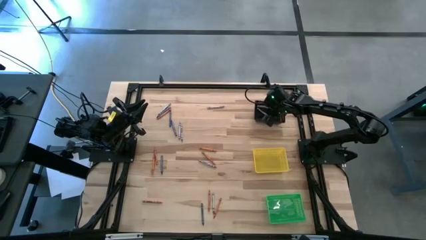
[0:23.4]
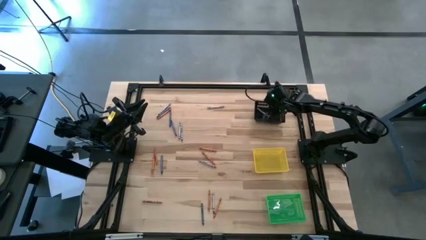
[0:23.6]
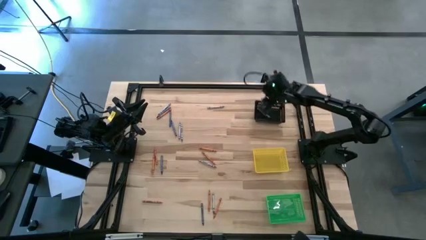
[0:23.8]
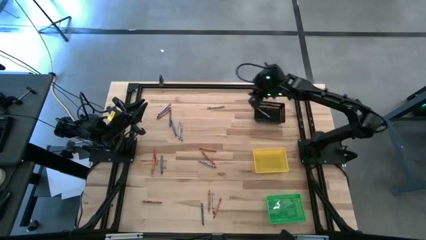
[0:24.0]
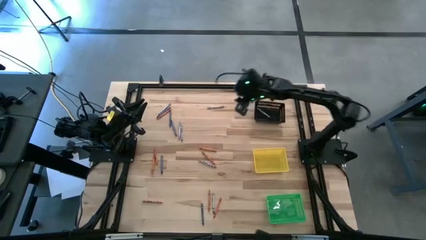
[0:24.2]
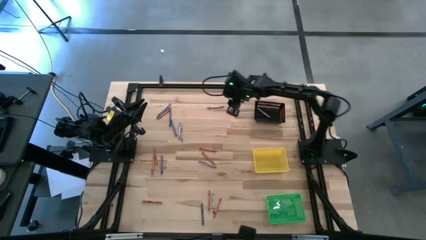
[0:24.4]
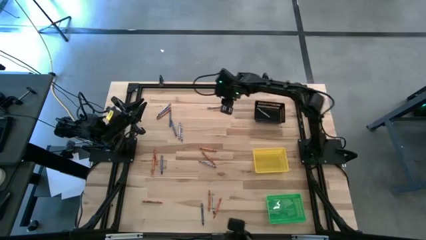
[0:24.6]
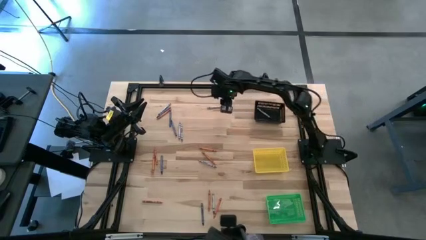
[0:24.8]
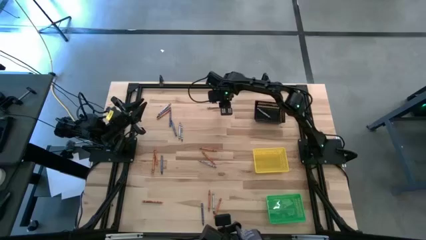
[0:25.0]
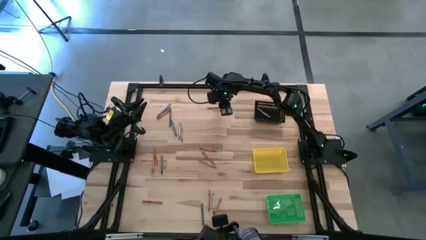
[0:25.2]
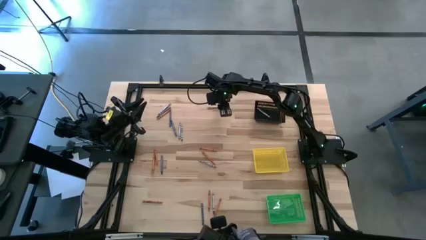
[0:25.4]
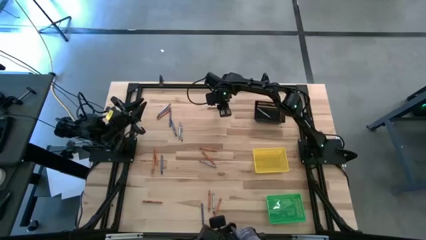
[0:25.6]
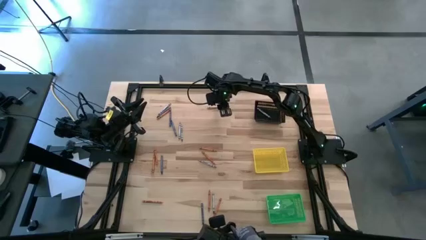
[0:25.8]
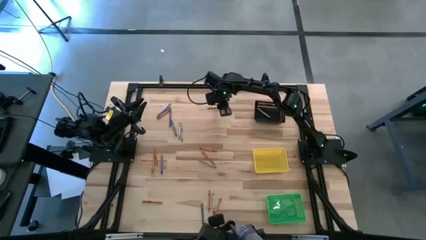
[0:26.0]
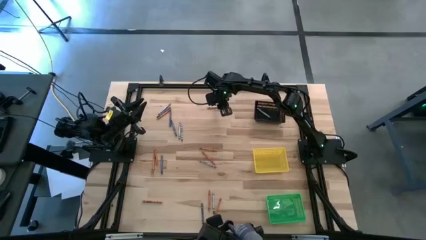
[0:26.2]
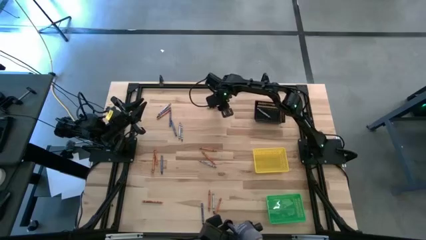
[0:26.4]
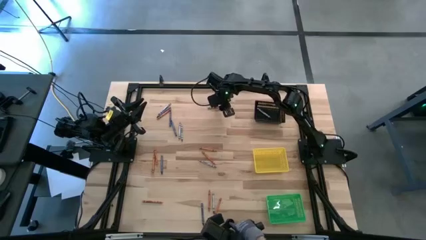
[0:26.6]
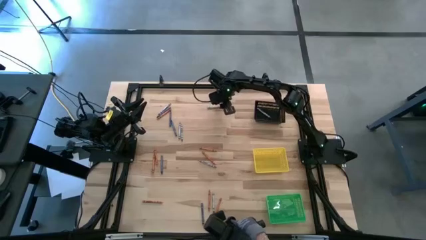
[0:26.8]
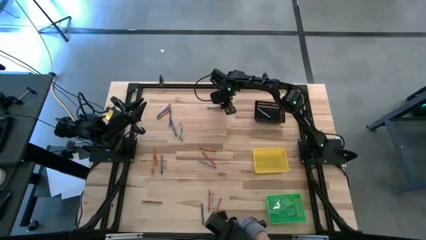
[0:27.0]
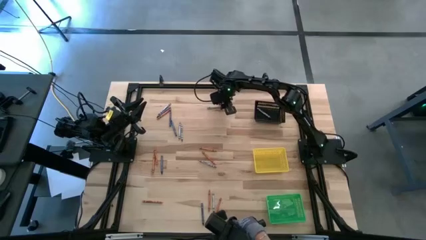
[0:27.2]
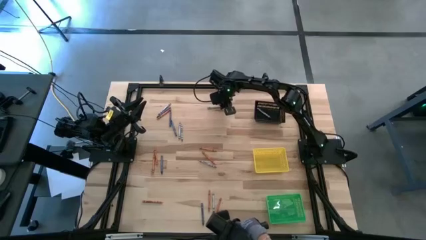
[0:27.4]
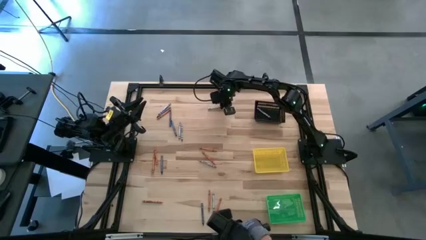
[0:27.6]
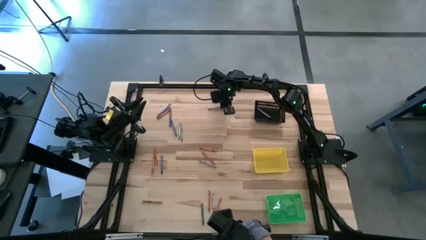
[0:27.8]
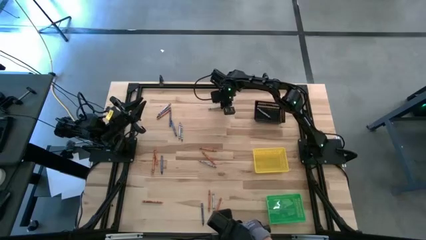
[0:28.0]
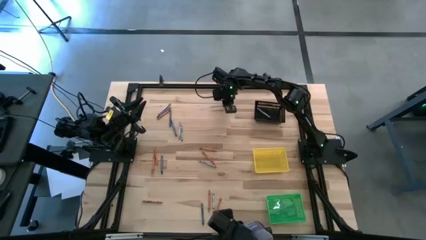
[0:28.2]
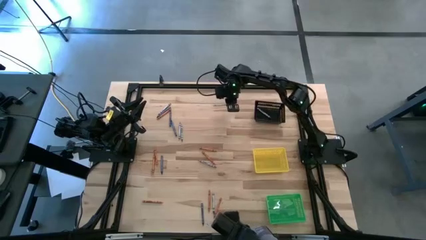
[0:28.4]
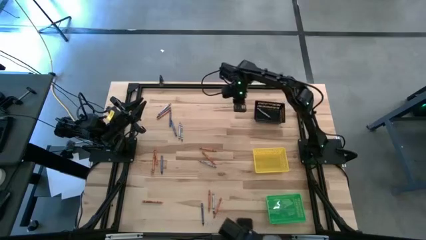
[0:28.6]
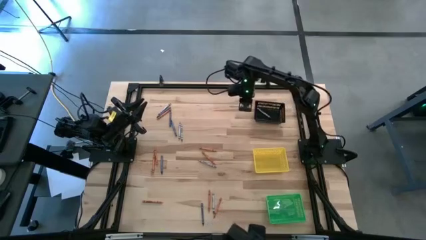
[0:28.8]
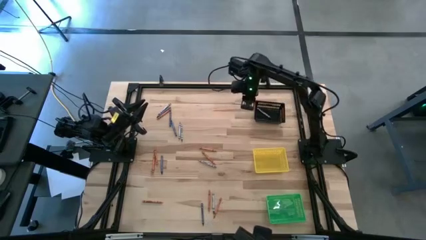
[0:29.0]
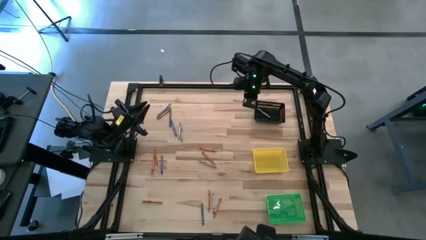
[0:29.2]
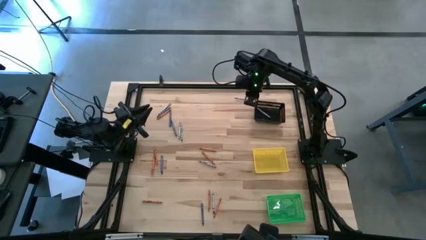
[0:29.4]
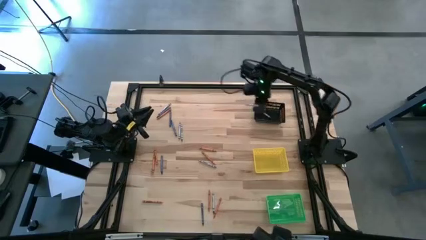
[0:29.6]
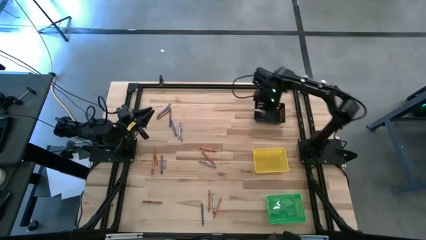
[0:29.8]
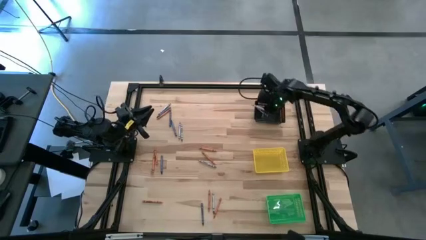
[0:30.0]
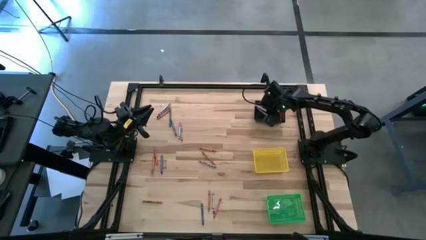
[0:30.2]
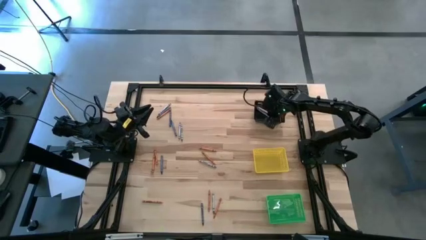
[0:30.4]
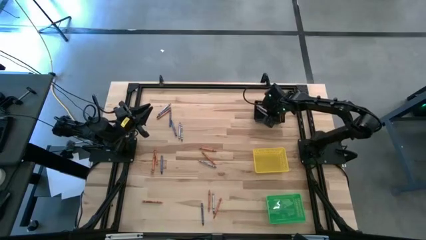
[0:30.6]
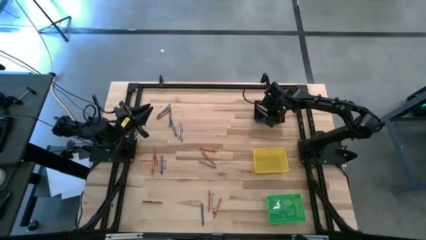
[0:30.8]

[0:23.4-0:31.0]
Task: Sort crayons
Put the gray crayon into the black basket

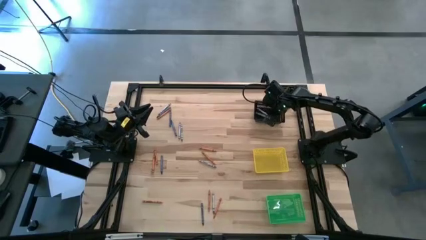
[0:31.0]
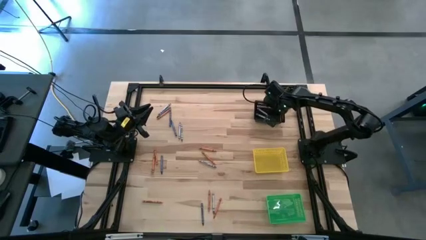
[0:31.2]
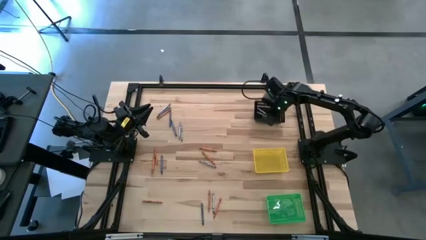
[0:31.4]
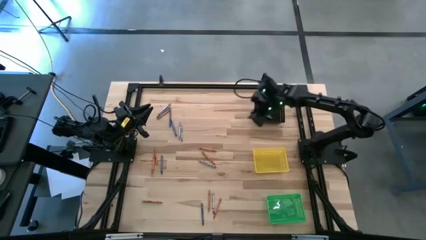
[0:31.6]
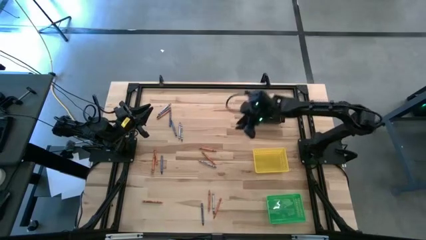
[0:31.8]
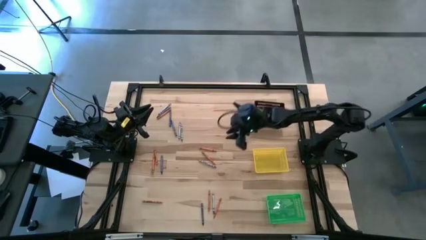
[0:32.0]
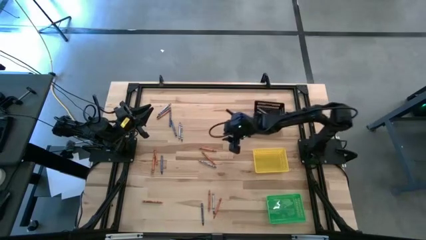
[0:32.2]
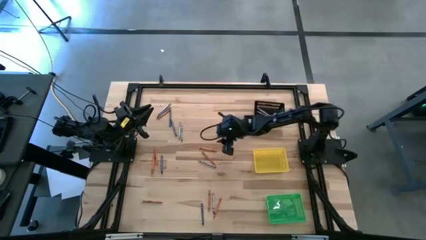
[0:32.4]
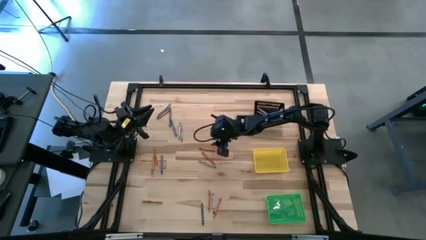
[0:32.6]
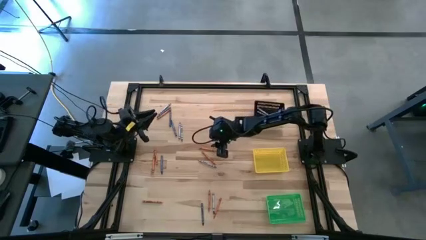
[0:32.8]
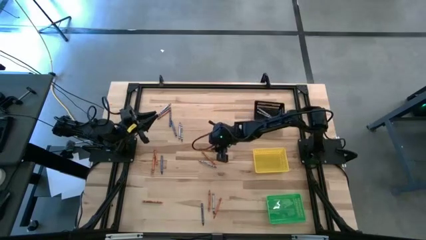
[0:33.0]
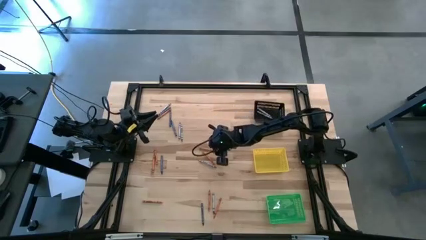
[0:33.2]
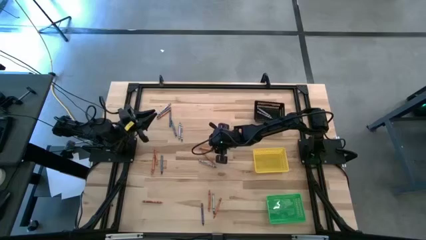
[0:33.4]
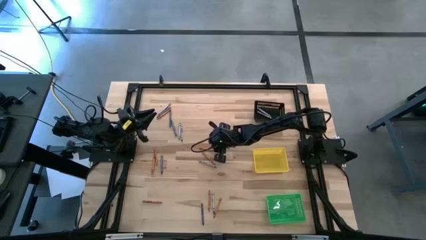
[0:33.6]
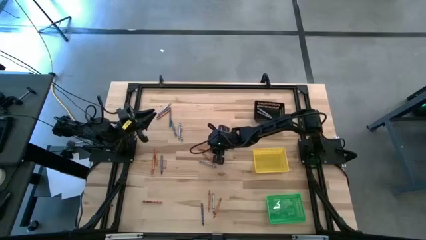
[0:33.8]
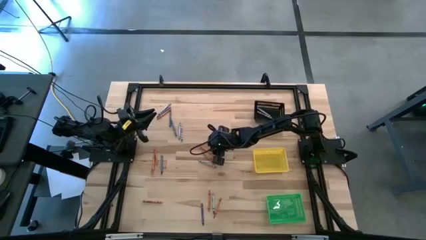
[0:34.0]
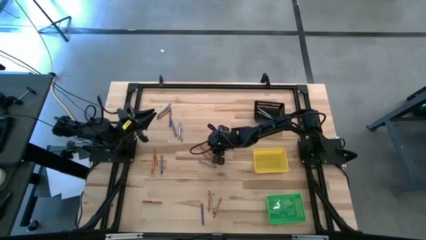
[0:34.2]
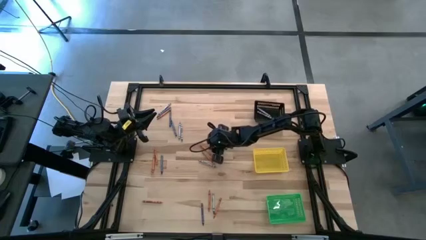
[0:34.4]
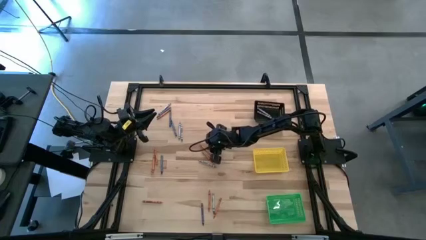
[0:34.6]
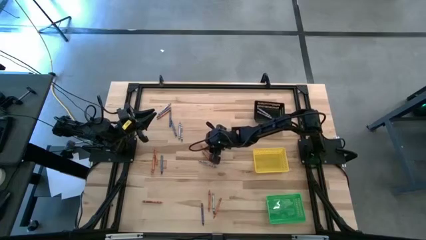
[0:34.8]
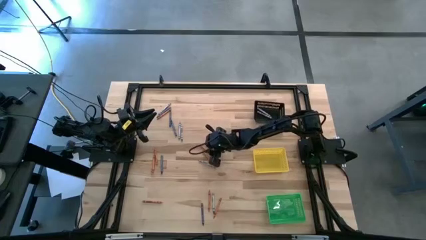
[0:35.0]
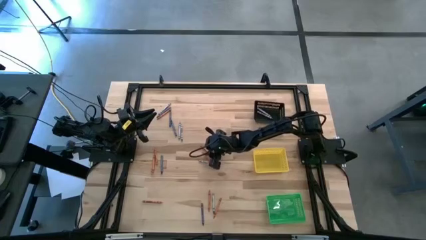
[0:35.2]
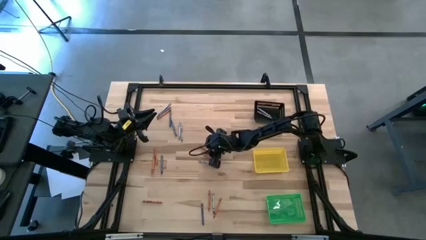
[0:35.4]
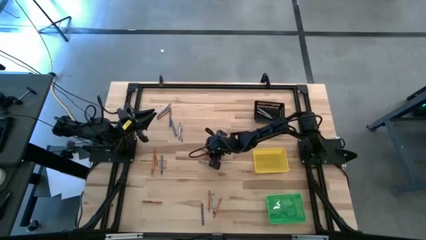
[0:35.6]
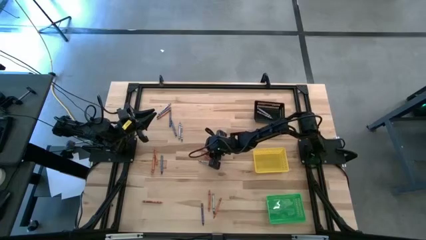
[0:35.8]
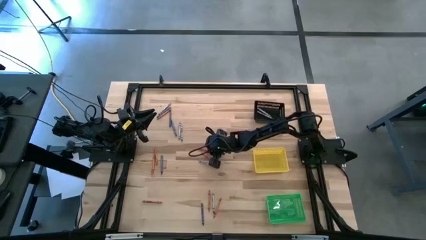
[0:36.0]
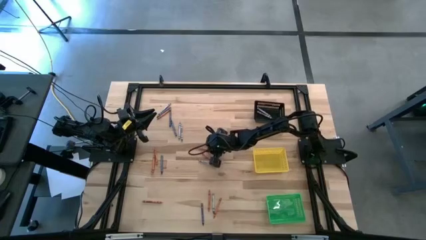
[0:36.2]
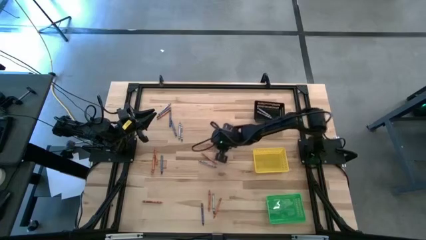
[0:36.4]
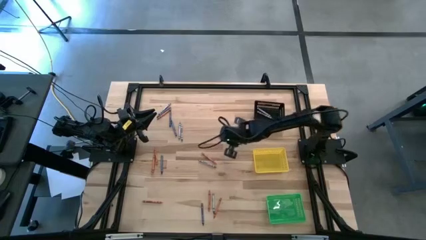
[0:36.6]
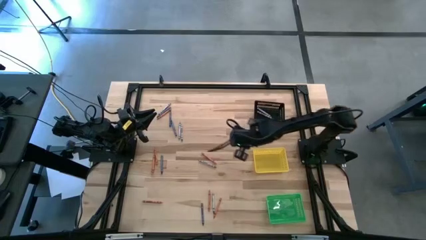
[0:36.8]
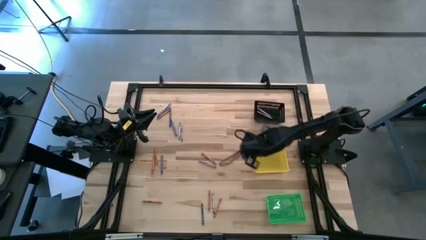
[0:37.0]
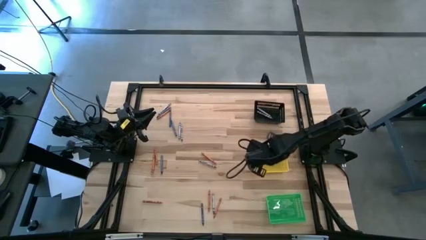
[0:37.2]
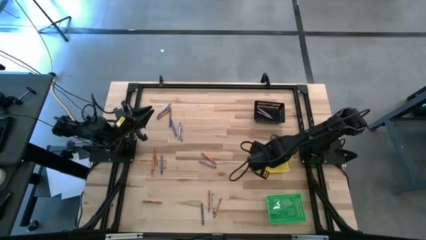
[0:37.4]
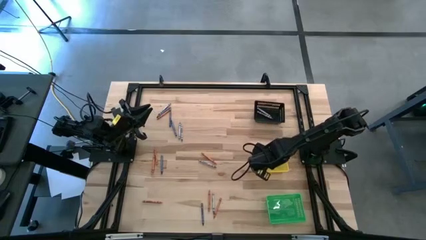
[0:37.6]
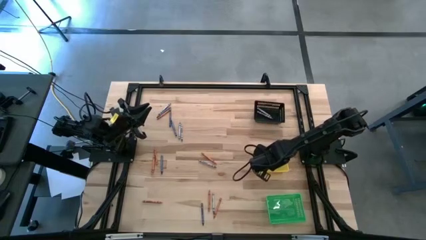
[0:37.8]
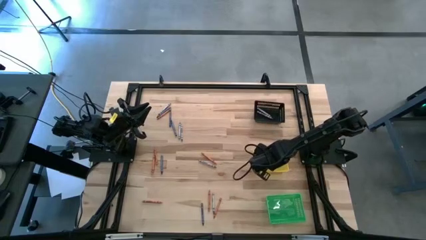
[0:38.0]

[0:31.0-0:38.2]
Put the orange crayon into the yellow basket
